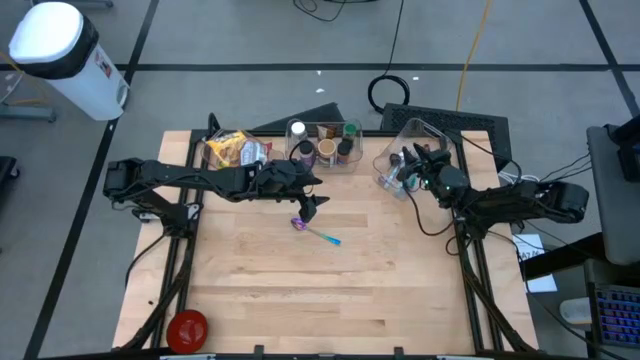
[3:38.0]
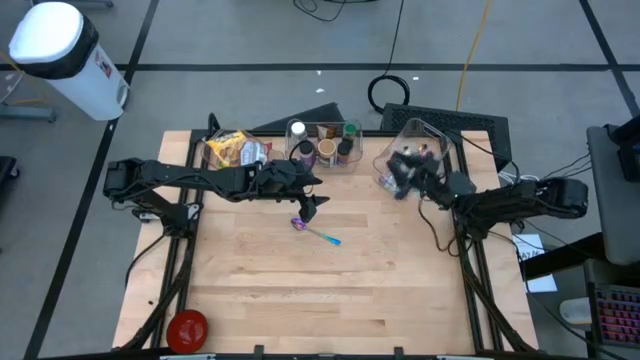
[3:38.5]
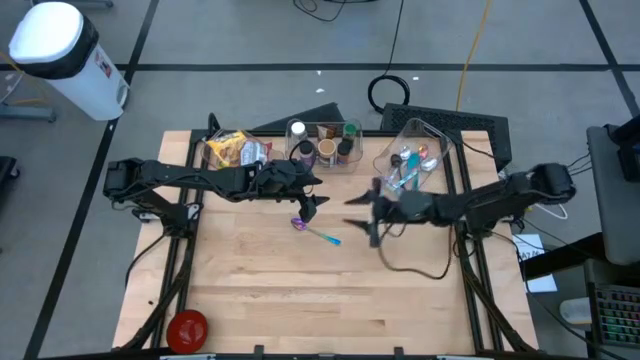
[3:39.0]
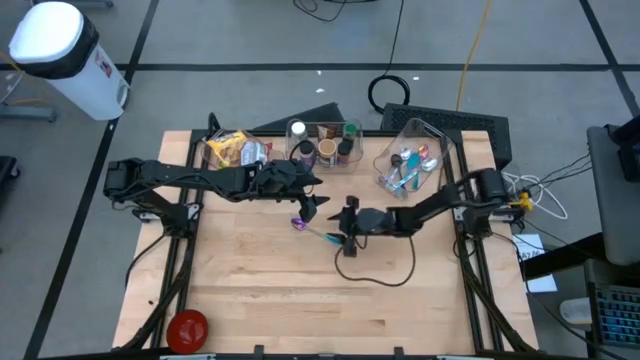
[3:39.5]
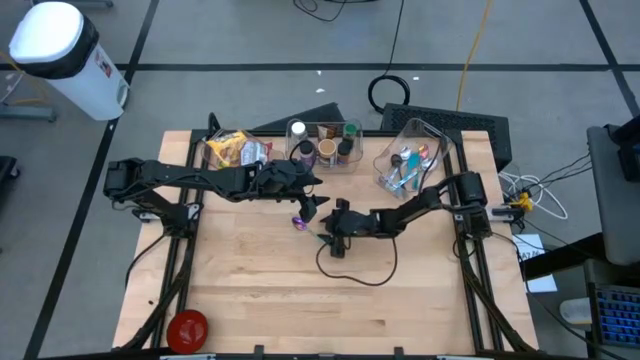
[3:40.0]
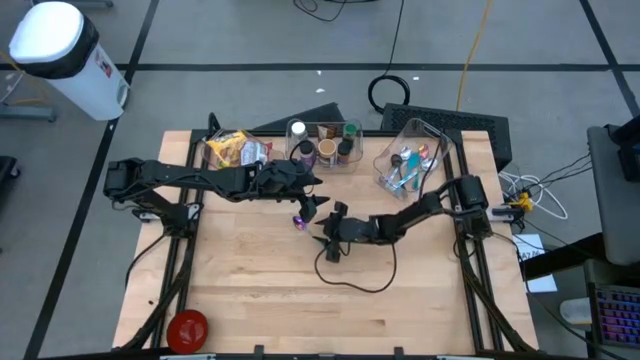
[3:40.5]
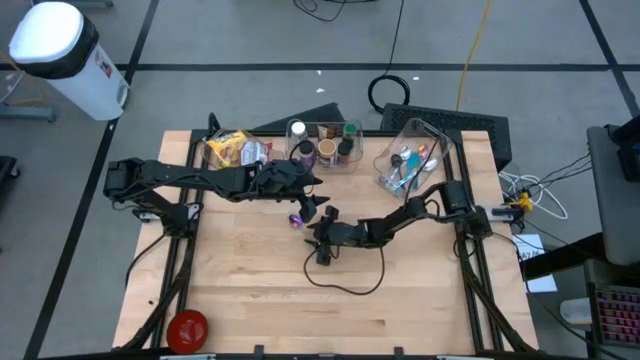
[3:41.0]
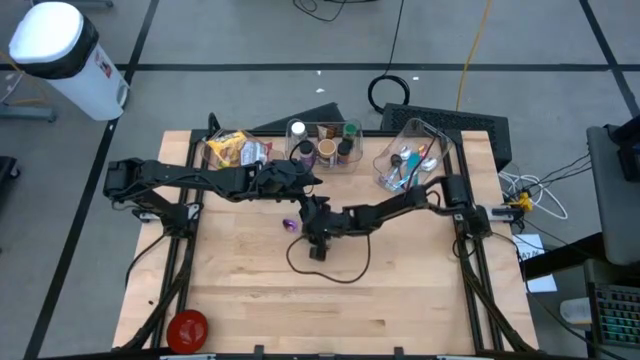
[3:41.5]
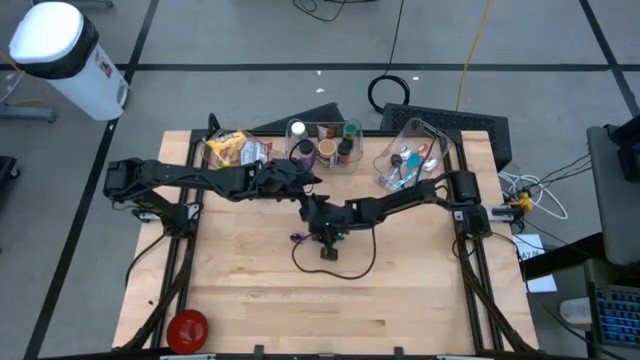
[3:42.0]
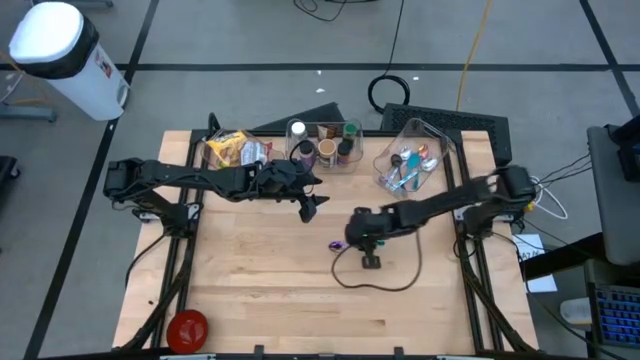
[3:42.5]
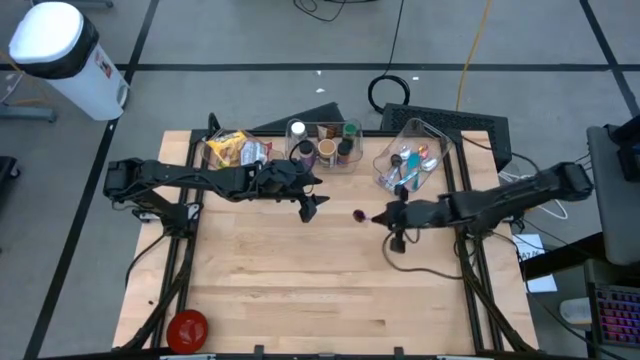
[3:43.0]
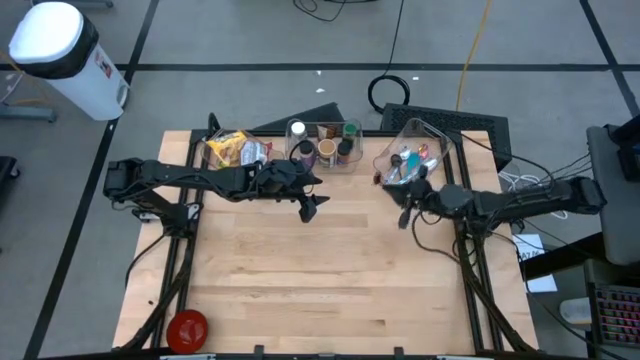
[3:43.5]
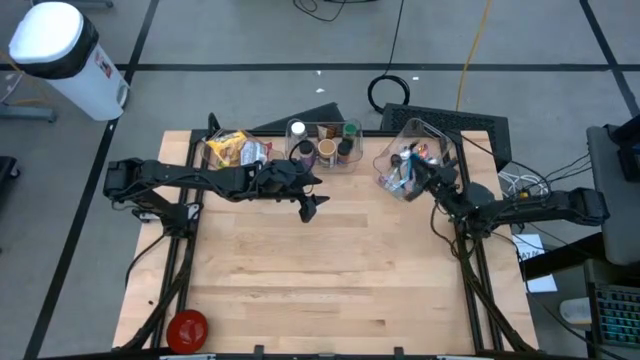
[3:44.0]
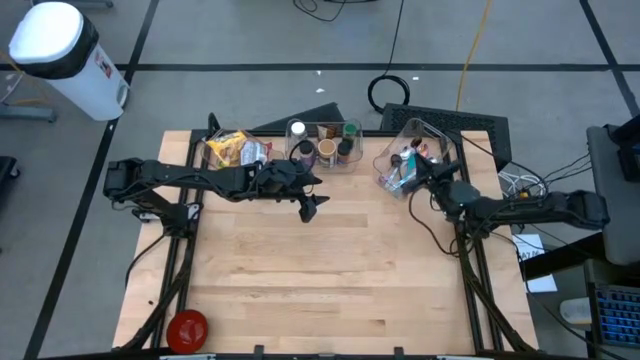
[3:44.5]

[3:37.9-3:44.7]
Task: Pick & Place Food Item
Put the violet spoon into the right transparent bin

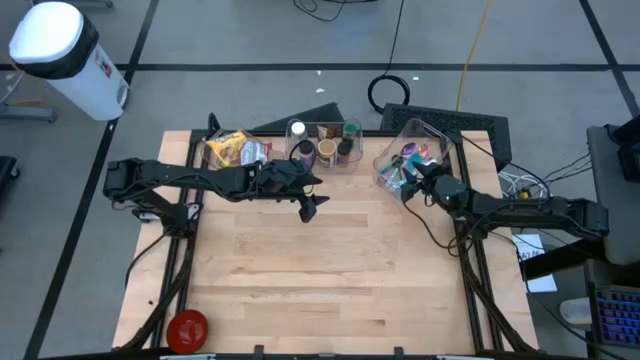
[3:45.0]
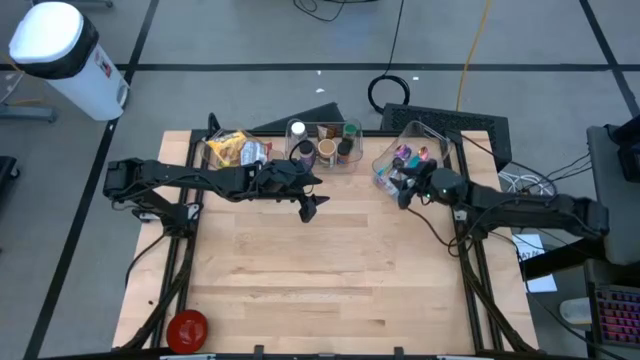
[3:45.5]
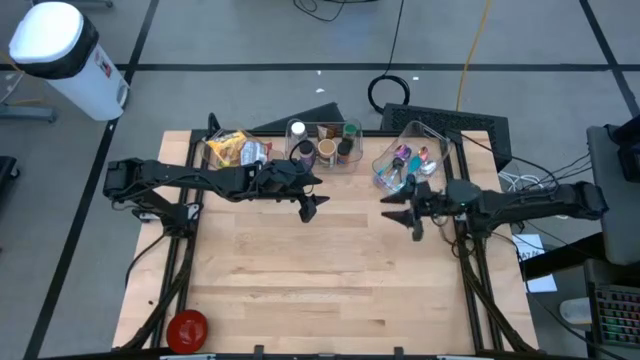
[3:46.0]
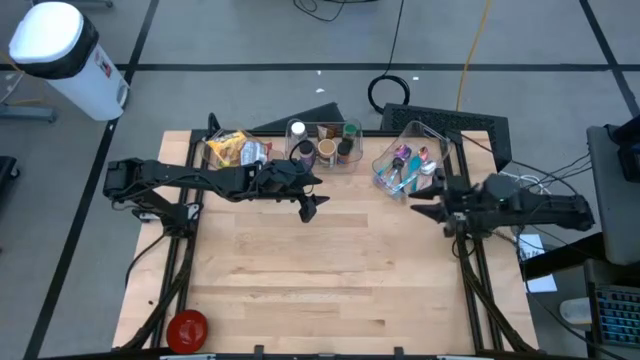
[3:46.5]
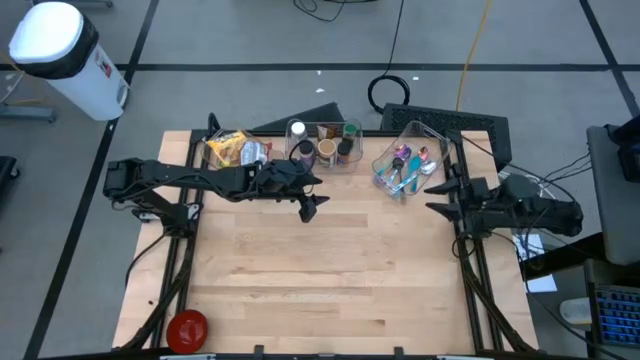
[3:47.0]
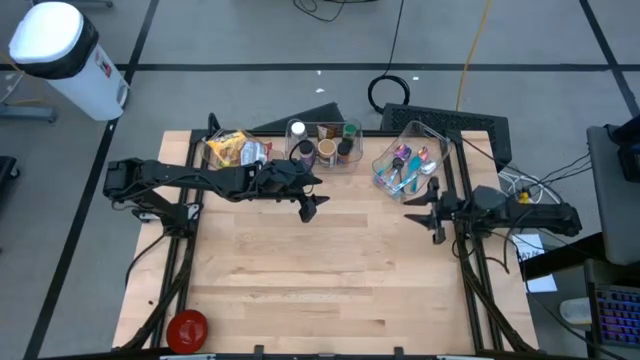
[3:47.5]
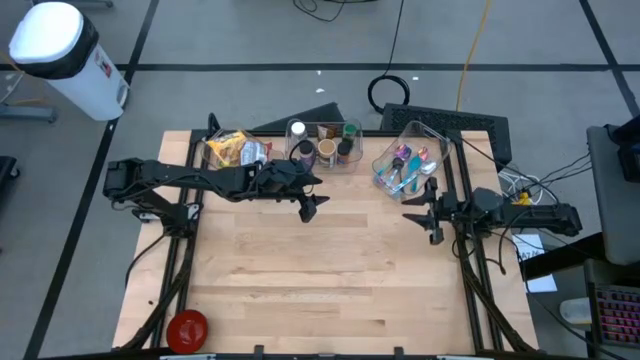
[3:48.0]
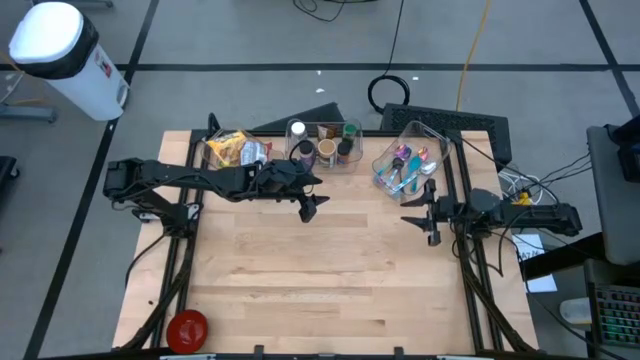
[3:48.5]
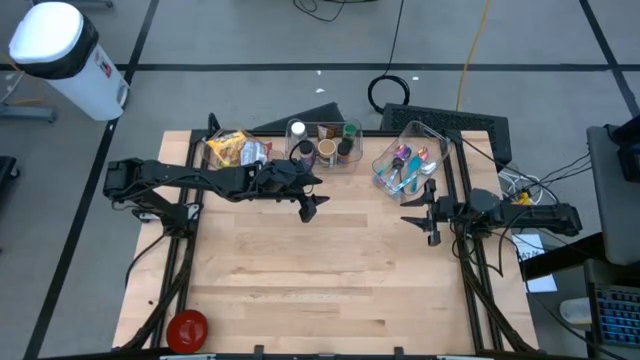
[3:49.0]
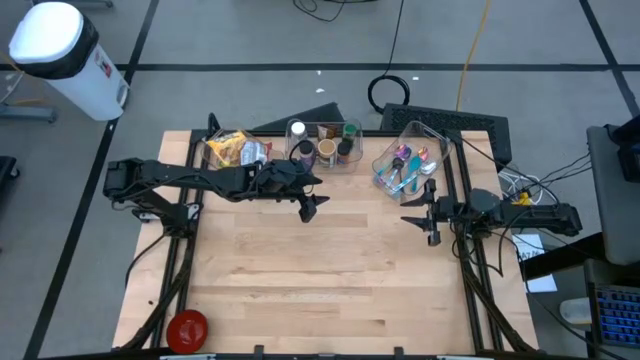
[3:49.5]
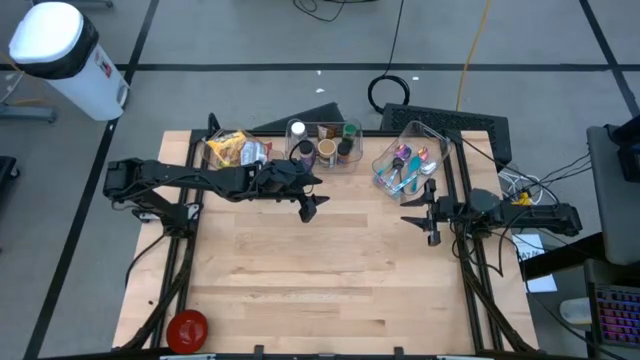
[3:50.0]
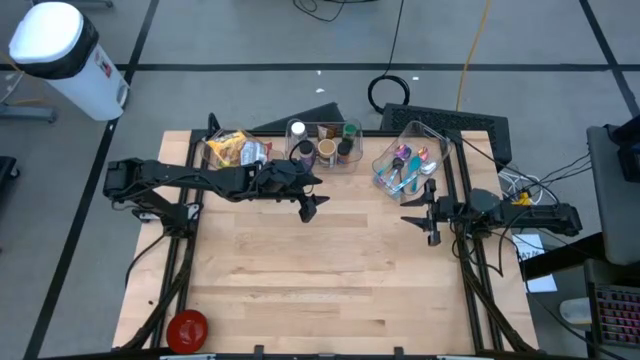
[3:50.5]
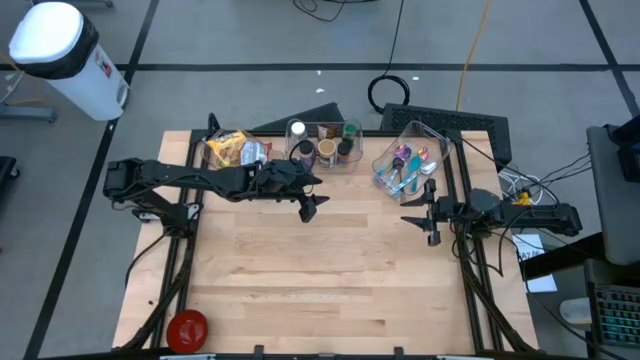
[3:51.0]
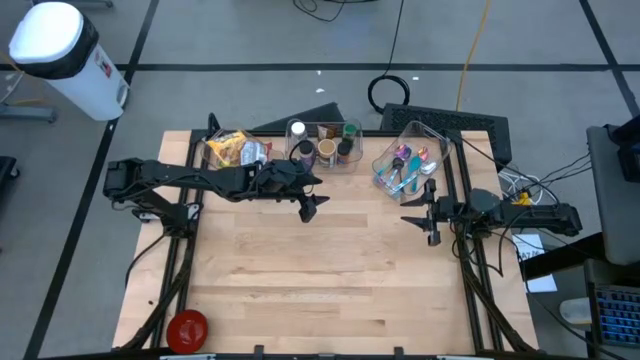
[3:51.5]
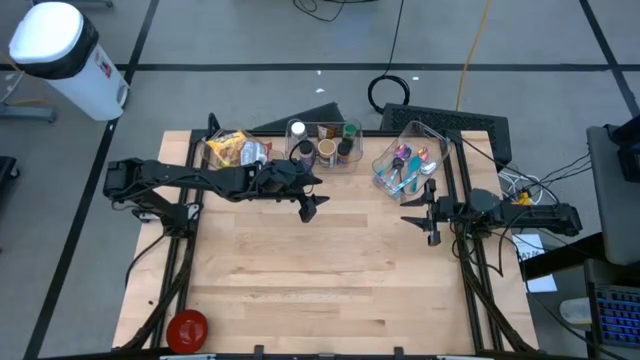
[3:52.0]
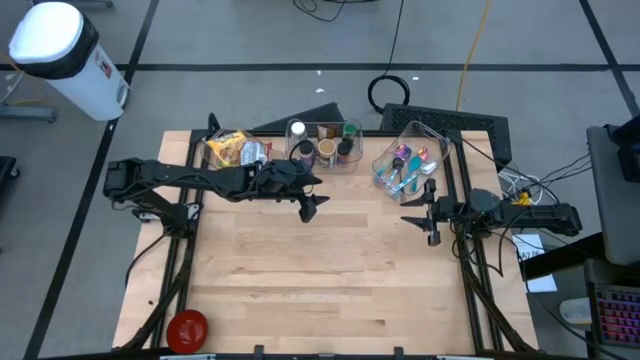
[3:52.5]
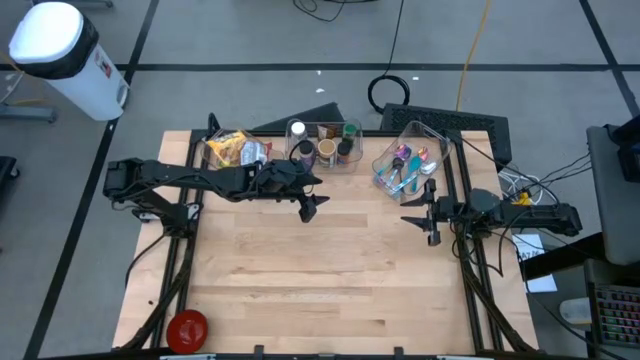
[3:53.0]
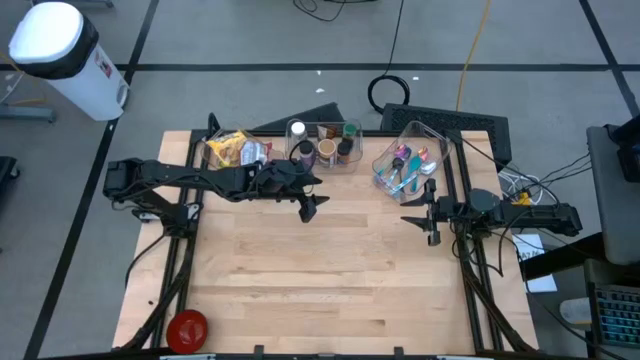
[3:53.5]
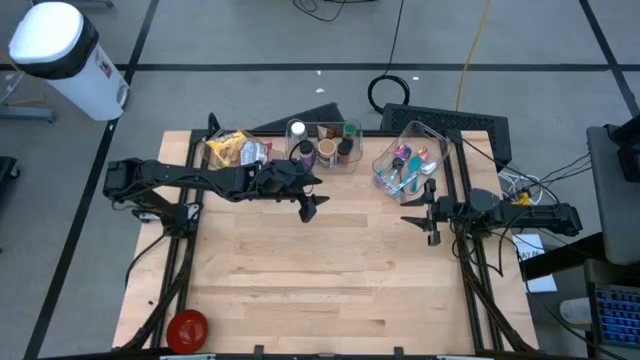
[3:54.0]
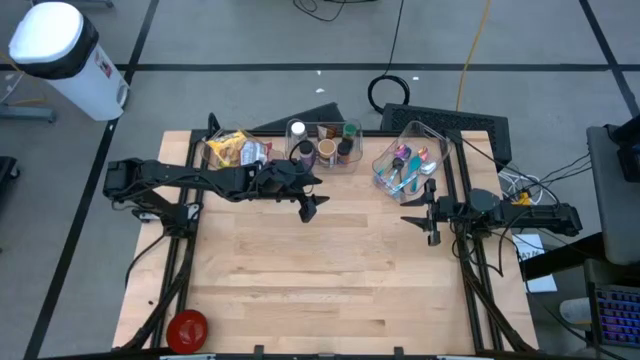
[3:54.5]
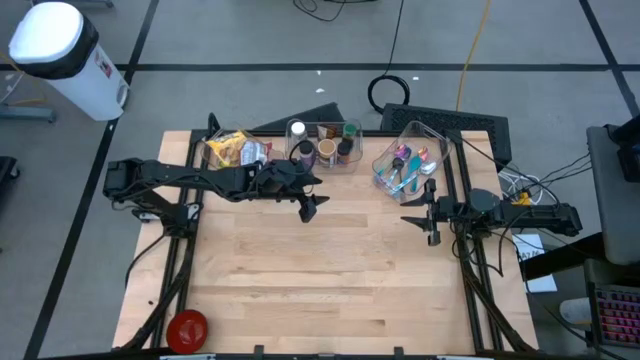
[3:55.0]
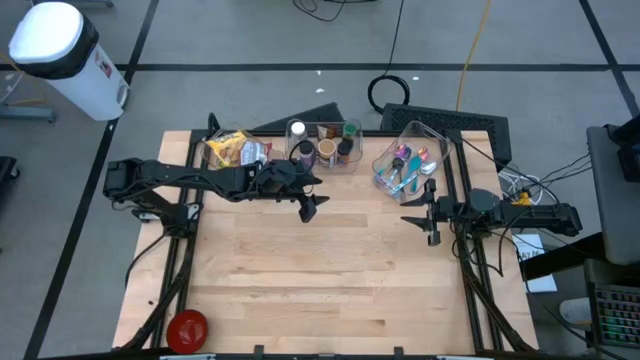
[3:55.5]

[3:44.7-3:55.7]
Return to Home Position

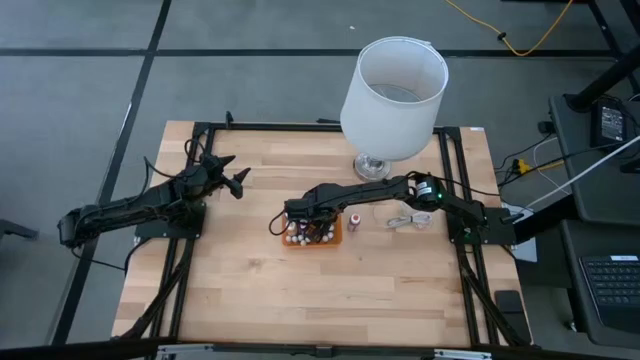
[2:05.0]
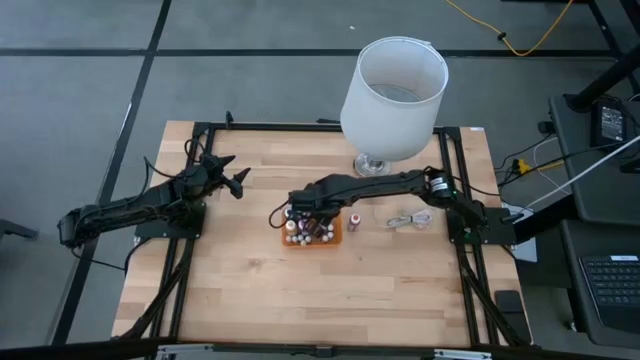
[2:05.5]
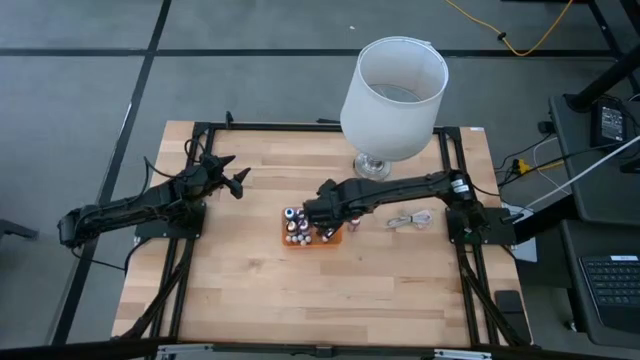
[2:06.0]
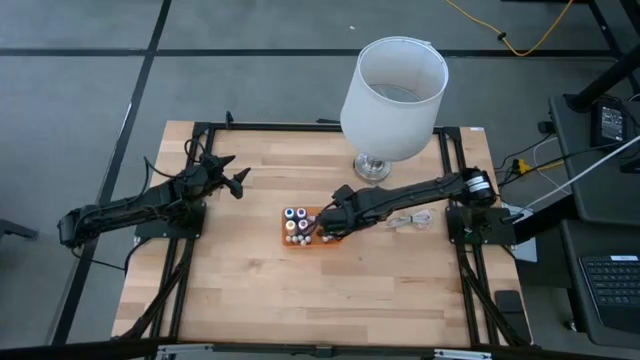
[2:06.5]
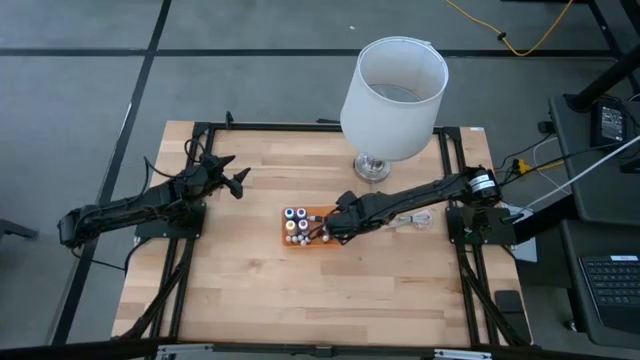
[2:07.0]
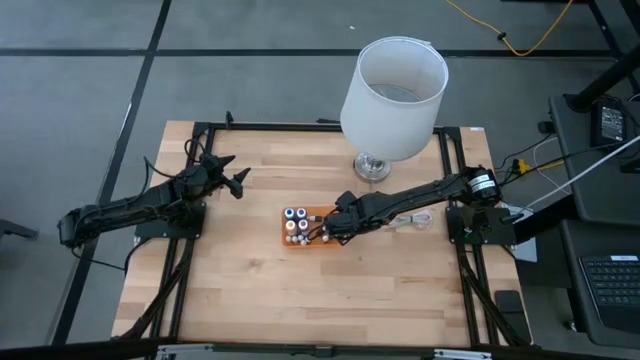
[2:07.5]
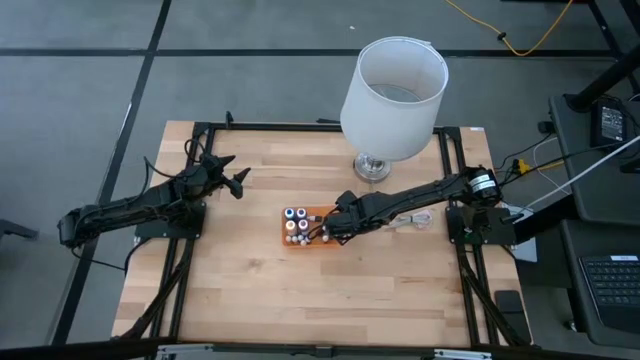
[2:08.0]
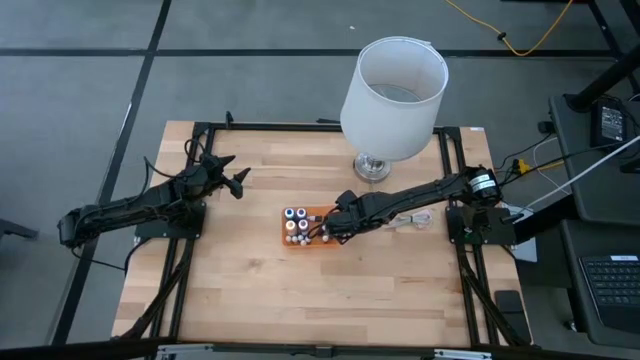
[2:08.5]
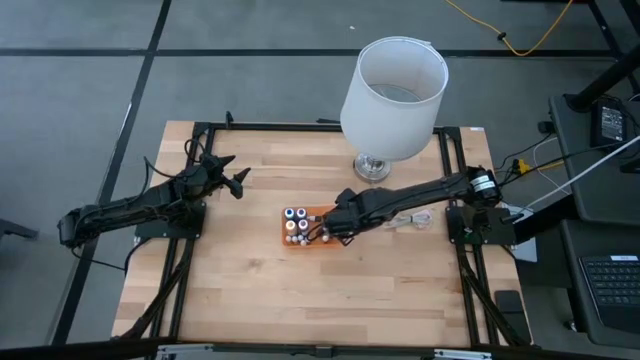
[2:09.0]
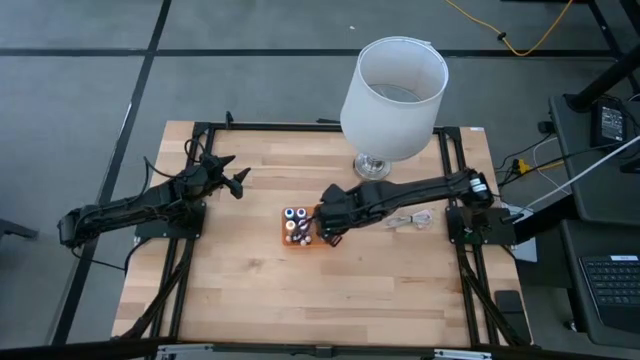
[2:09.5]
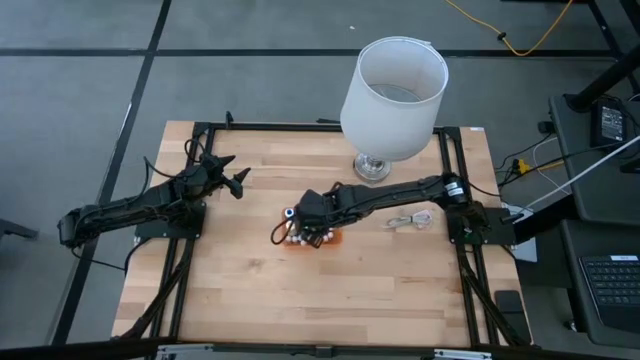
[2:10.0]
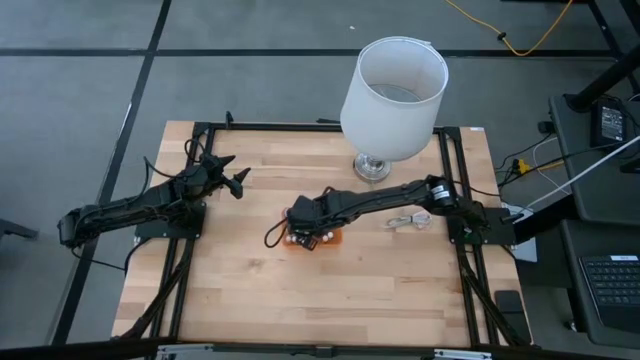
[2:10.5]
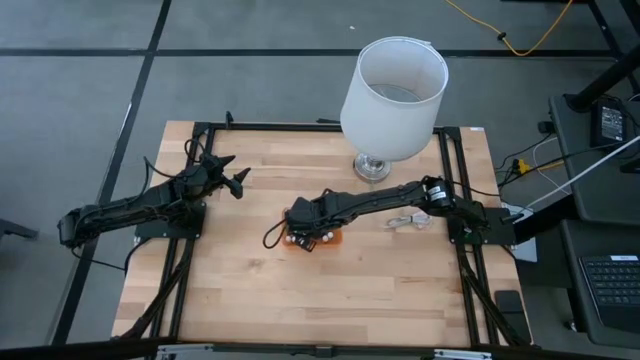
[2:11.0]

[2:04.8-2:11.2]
Task: Pick & Place food coloring
Put the big orange food coloring bottle into the orange transparent bin
